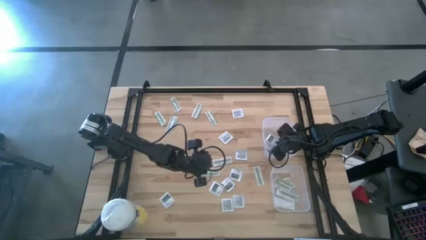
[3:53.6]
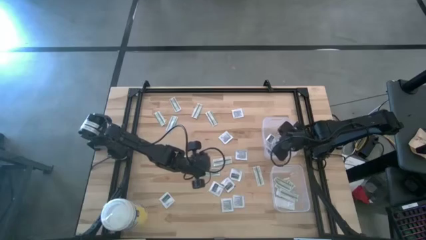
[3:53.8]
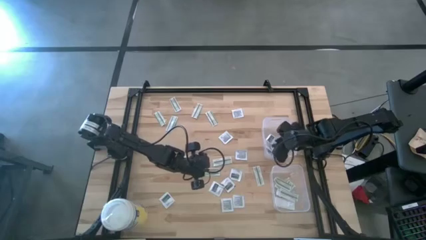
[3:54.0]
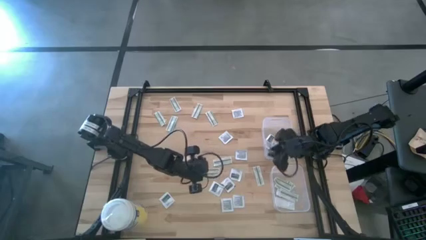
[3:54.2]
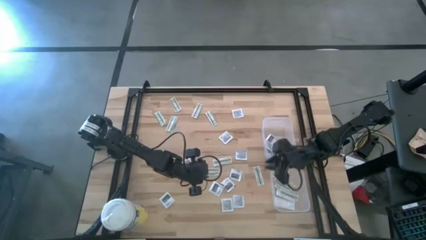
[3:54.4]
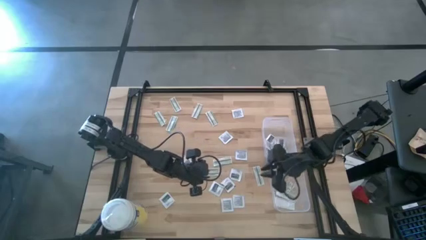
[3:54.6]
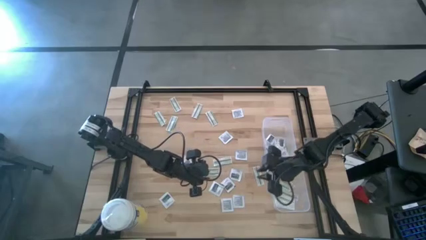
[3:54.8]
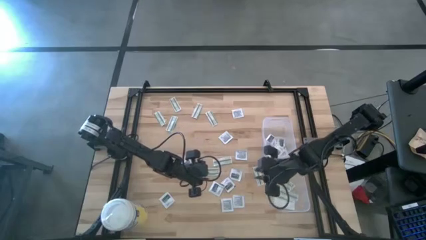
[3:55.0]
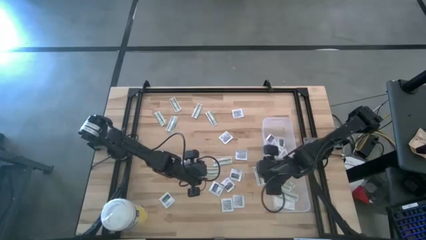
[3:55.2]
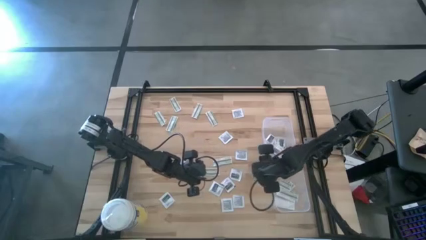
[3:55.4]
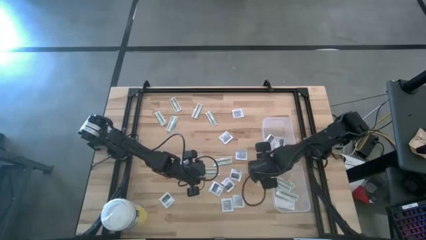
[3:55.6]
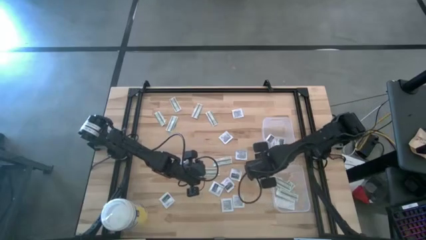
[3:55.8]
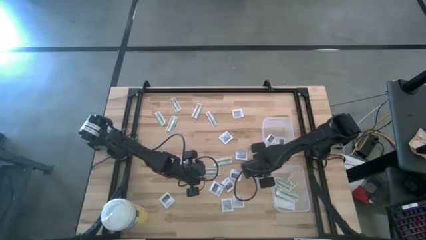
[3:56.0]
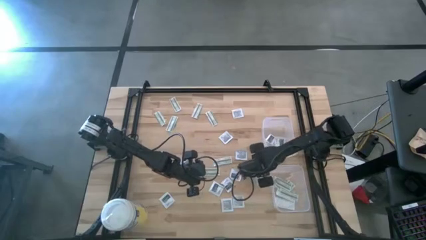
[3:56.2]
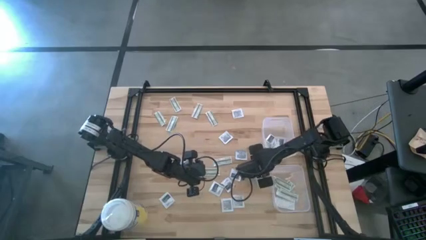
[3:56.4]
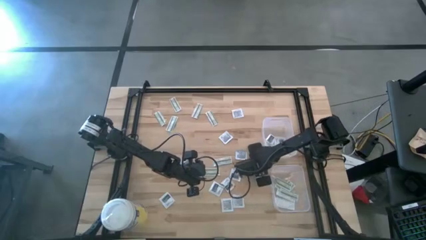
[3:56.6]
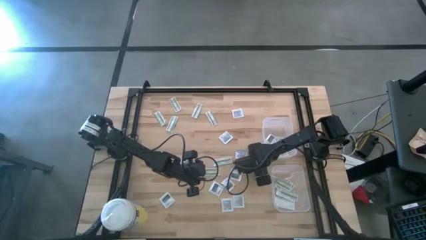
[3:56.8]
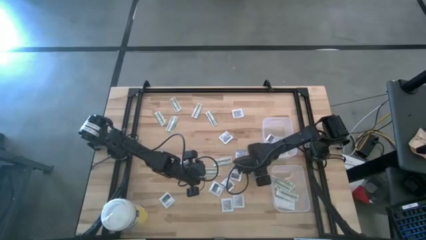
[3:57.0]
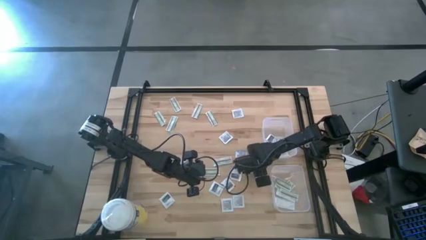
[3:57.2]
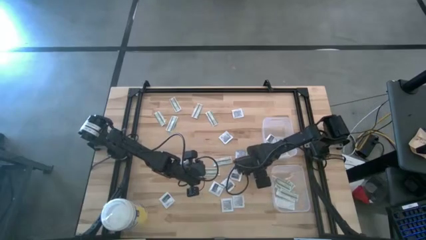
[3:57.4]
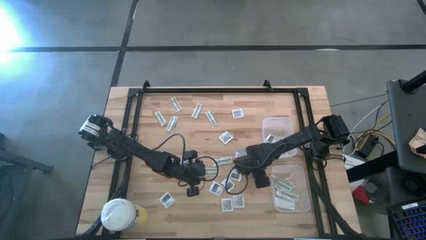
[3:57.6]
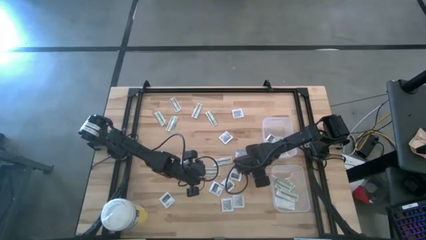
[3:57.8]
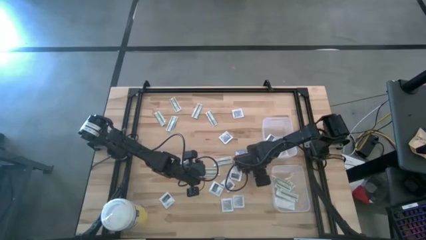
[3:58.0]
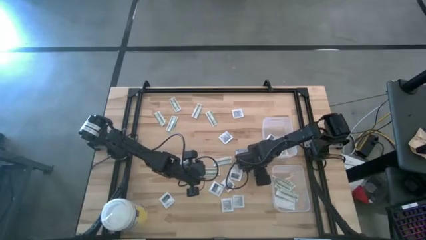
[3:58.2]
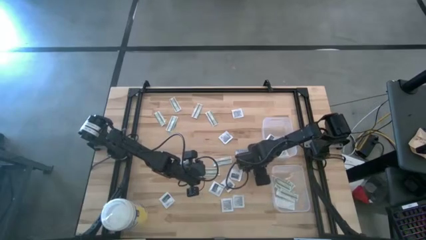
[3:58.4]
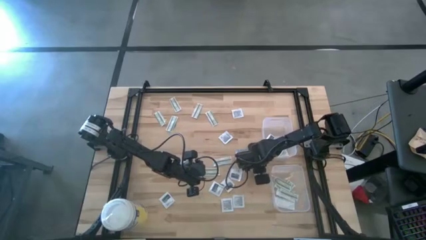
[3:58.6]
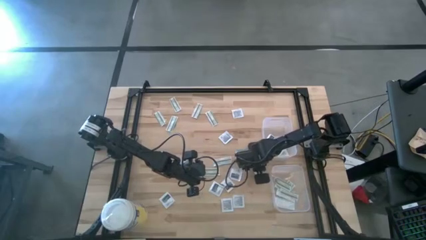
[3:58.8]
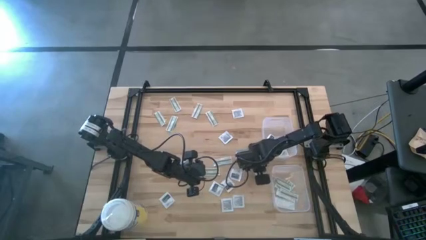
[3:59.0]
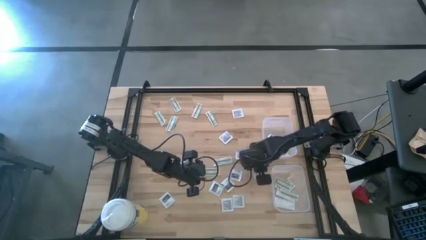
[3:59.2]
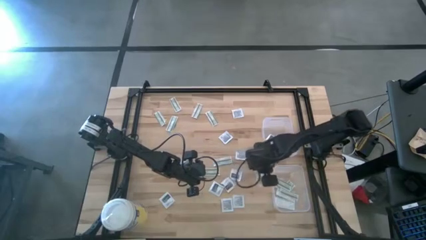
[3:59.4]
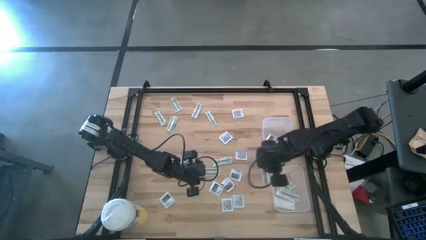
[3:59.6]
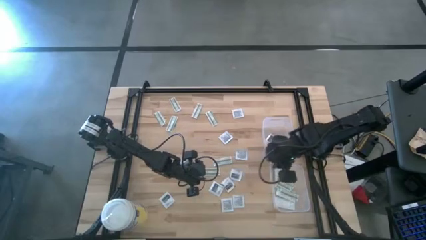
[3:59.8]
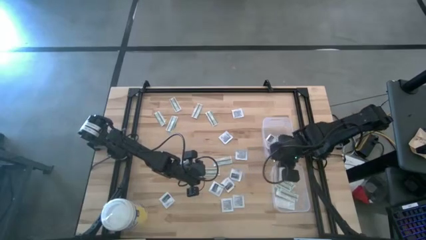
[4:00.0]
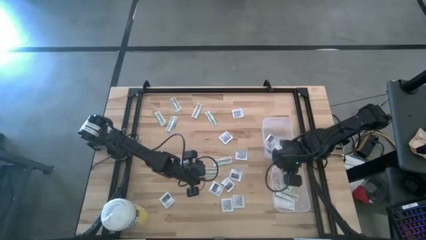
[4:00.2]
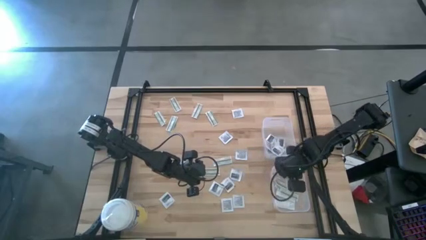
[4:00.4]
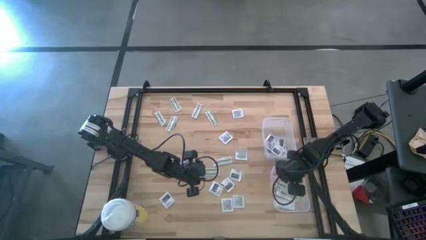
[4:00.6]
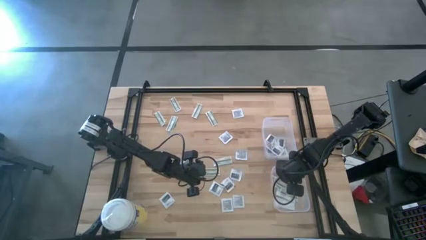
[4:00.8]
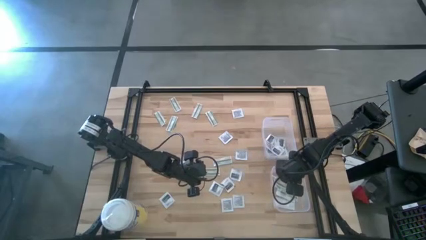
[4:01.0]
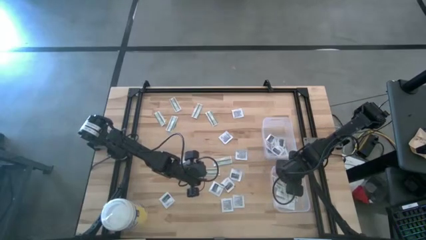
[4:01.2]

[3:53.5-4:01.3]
Task: Pick & Place First Aid Supplies
Put the bandage pack into the bottom bin

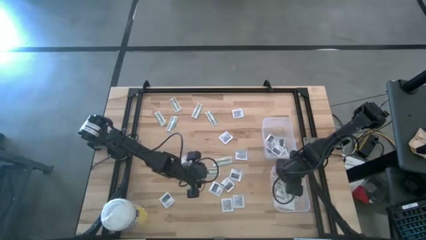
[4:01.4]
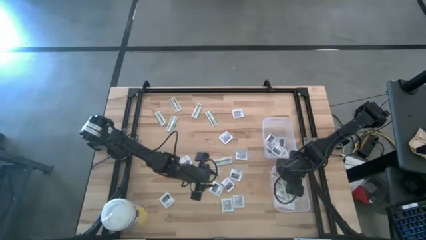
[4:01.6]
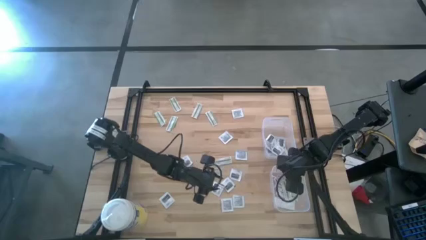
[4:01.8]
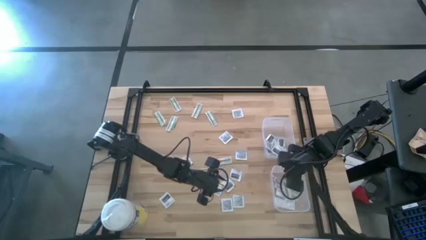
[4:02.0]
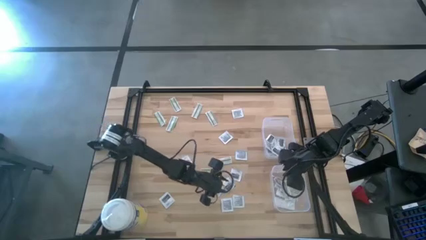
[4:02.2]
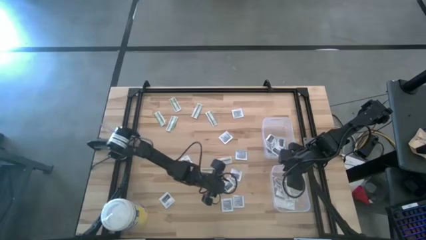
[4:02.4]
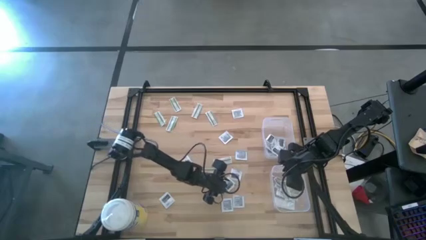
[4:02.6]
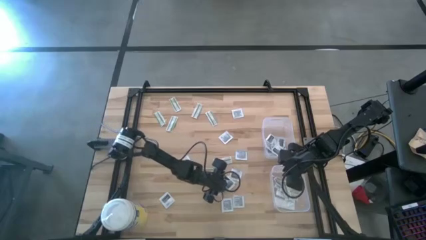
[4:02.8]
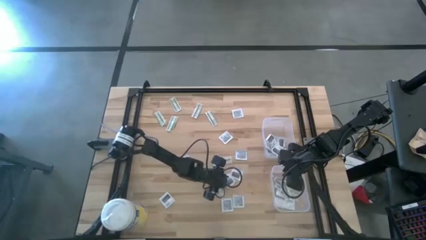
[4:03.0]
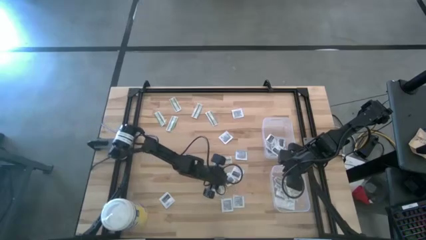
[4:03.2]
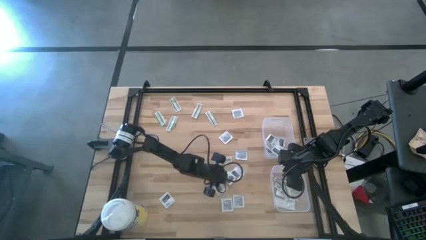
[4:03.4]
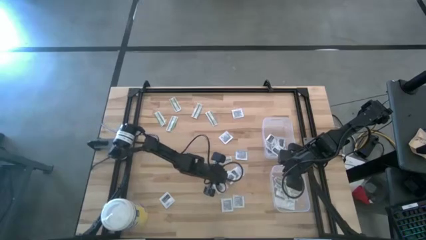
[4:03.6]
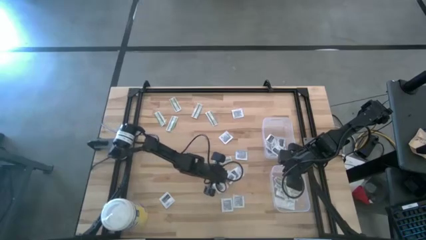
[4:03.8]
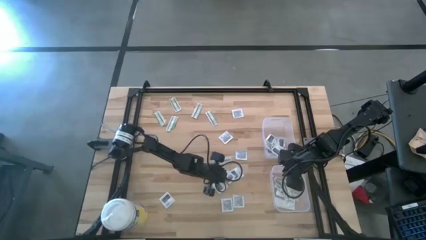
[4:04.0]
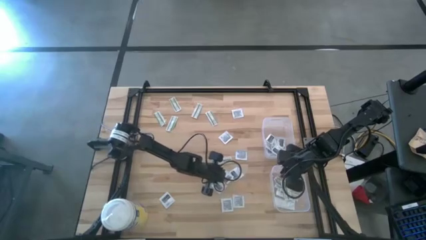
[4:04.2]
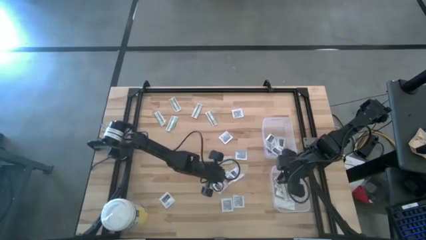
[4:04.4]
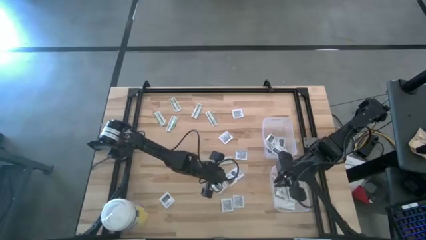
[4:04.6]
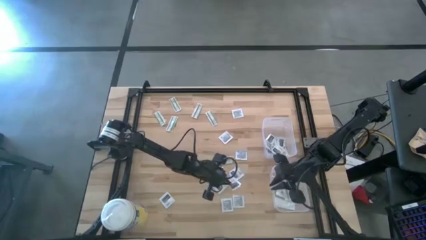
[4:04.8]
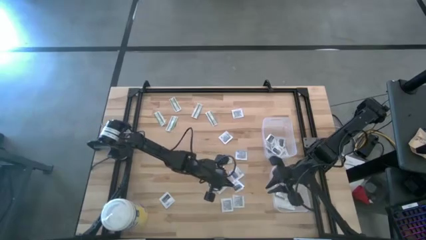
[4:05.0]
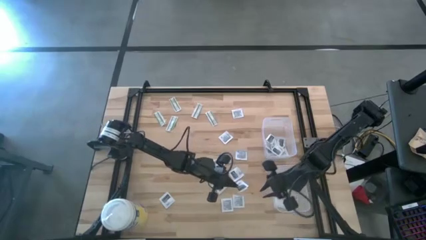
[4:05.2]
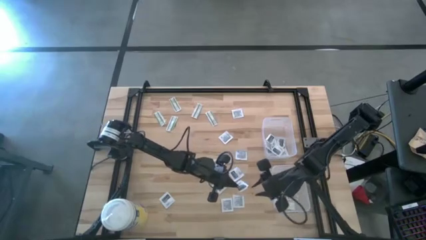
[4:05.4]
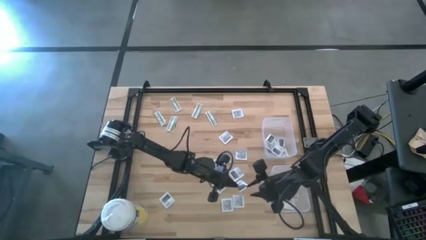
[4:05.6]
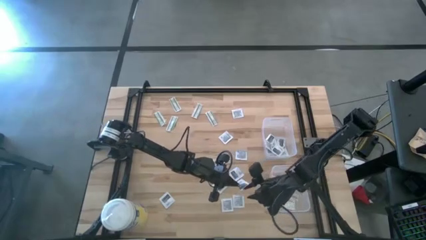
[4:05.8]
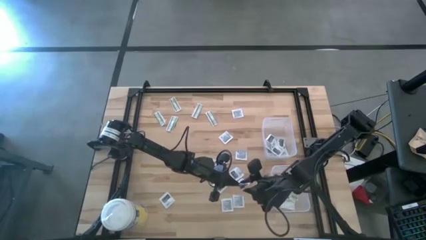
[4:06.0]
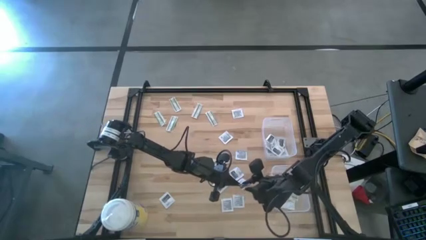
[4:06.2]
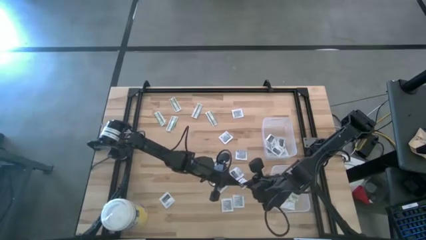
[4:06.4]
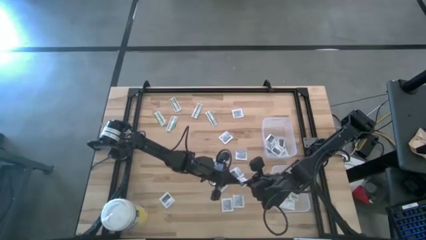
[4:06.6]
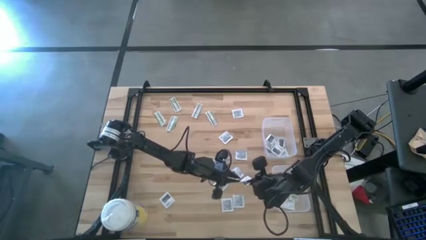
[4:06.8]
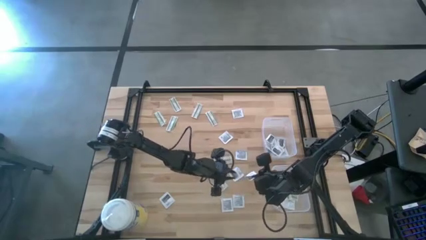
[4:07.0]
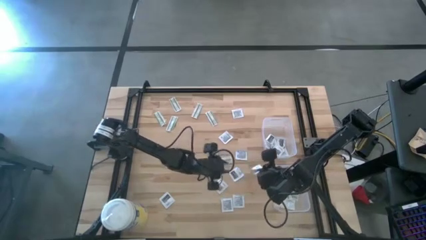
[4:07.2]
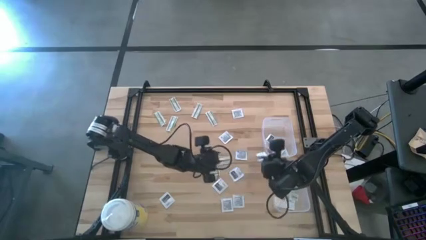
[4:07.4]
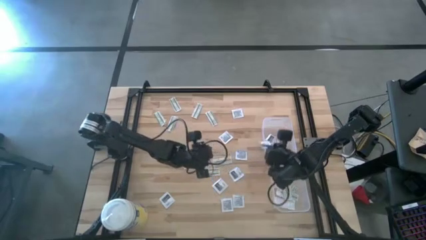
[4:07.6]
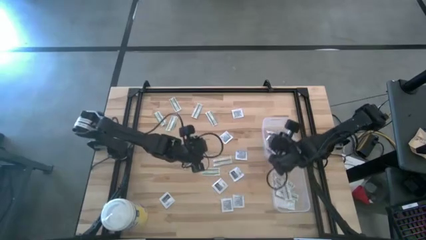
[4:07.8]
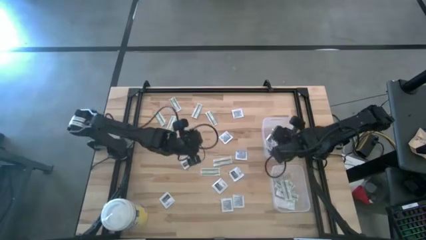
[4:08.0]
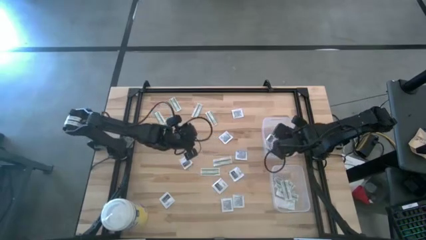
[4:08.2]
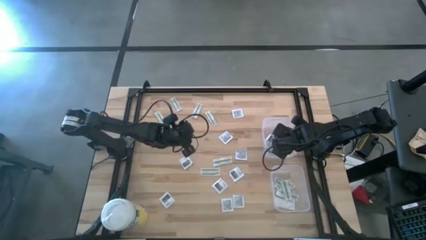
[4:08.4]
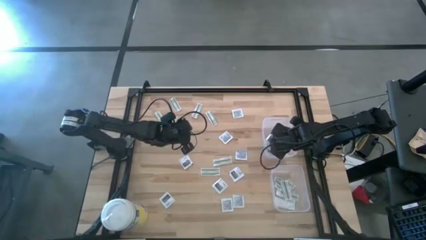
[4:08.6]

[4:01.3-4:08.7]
Put the towelette pack into the top bin

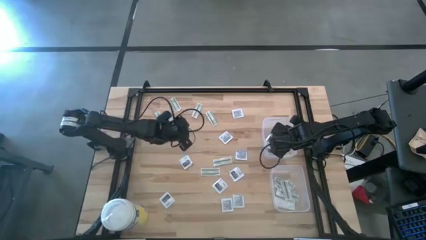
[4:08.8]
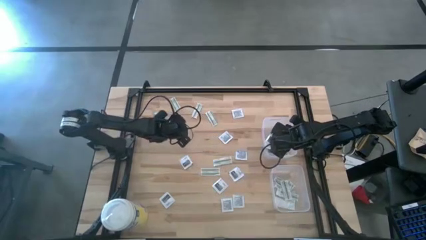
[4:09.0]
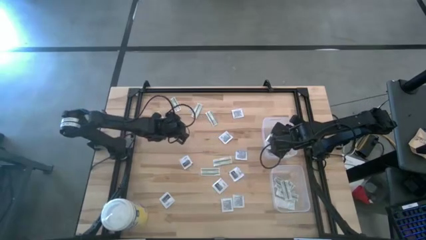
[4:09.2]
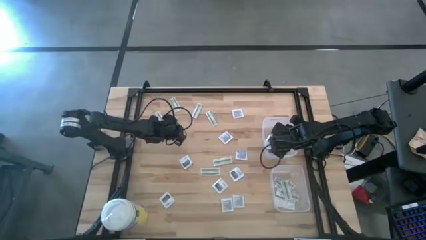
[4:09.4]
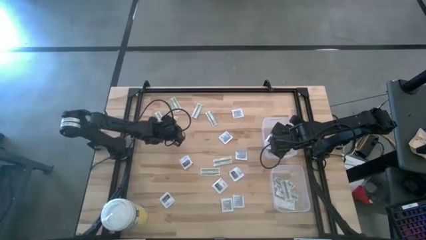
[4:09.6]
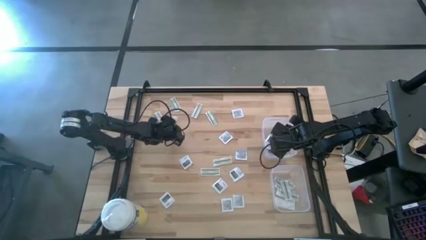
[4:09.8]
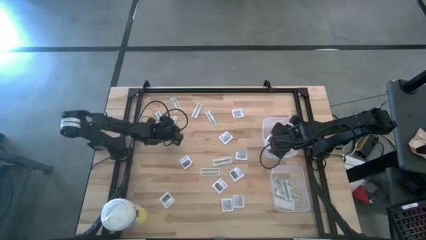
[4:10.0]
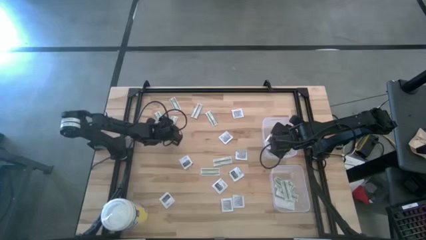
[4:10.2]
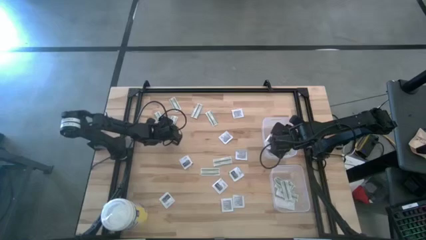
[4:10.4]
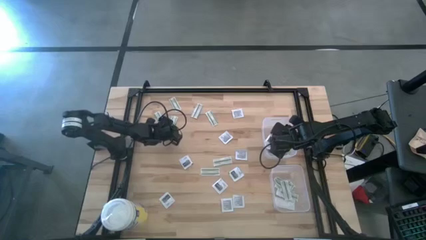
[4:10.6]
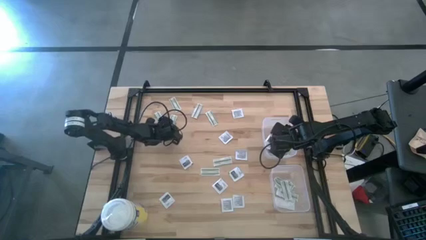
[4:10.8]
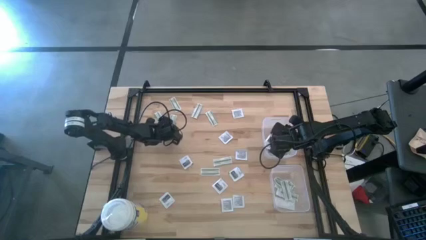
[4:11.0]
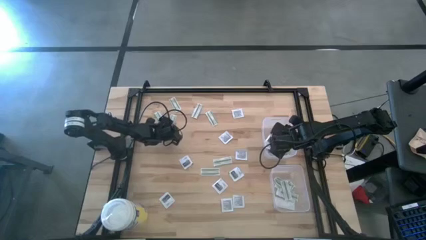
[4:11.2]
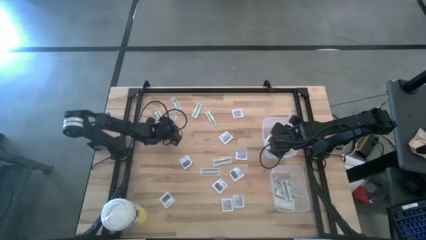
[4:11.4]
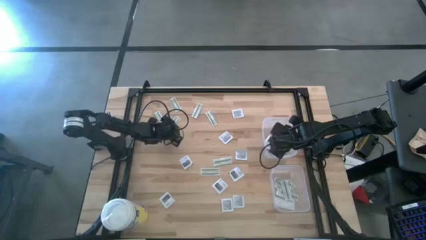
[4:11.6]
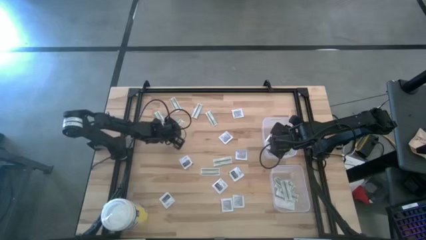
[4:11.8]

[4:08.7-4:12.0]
Put the bandage pack into the bottom bin
